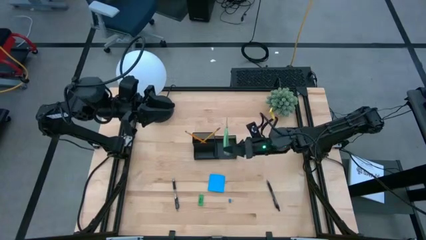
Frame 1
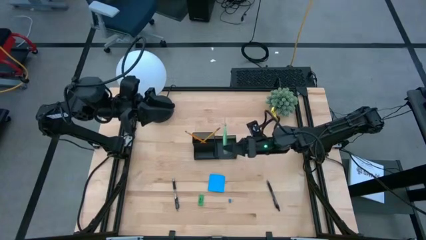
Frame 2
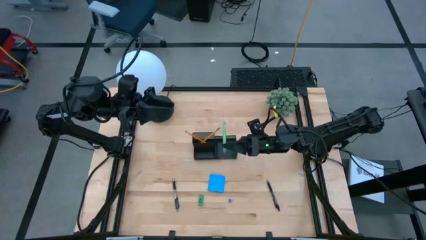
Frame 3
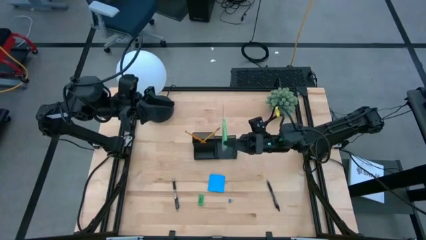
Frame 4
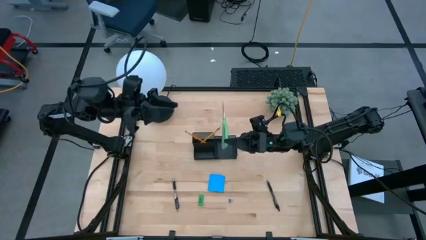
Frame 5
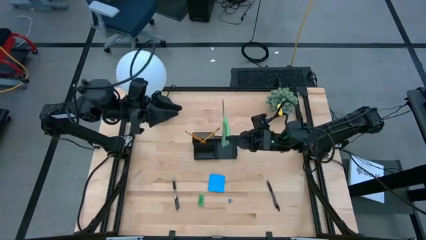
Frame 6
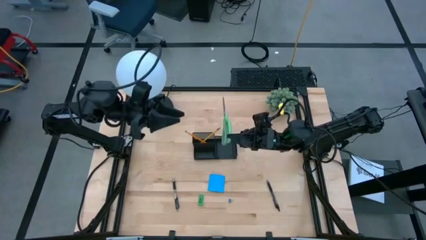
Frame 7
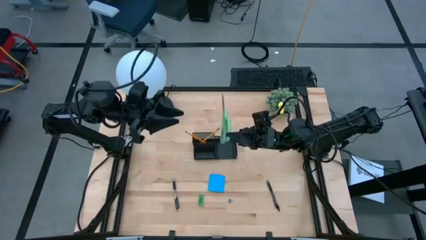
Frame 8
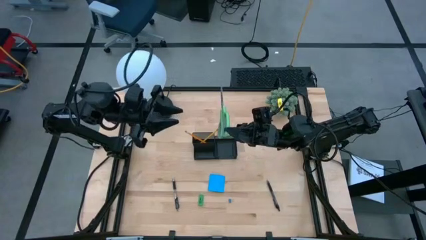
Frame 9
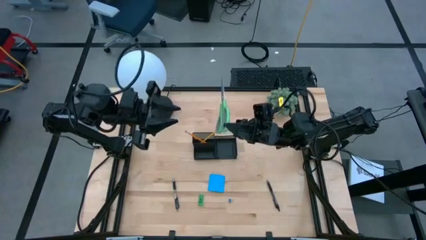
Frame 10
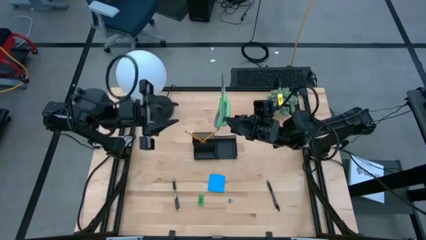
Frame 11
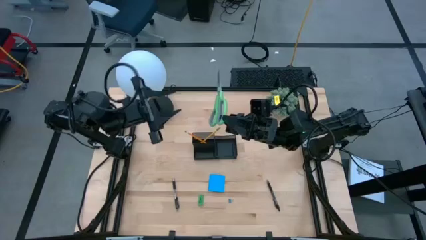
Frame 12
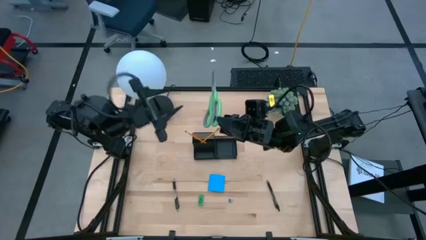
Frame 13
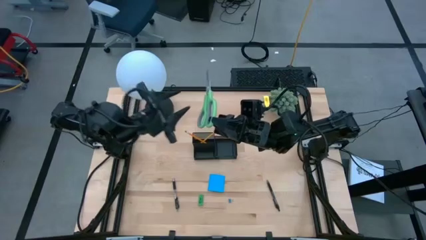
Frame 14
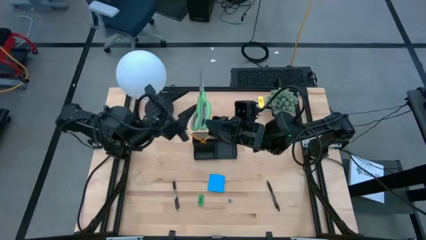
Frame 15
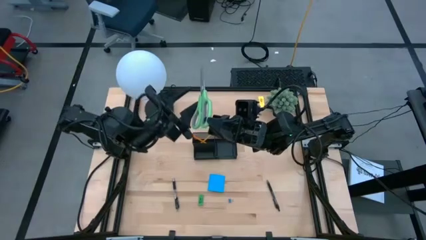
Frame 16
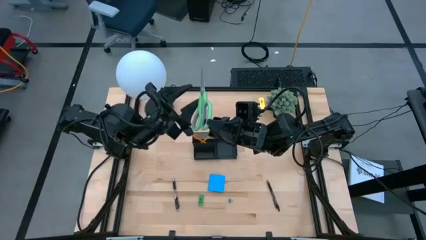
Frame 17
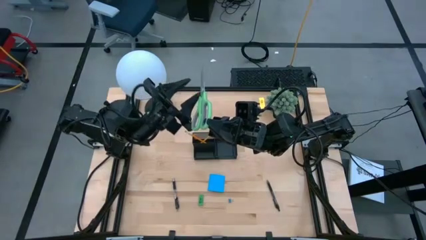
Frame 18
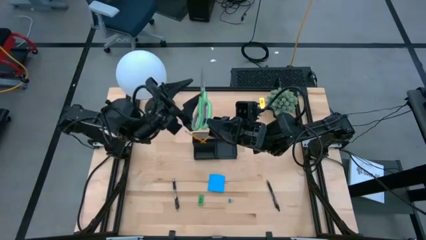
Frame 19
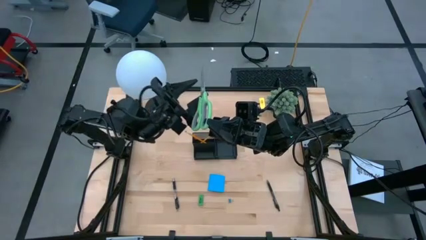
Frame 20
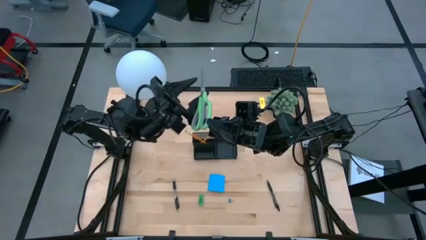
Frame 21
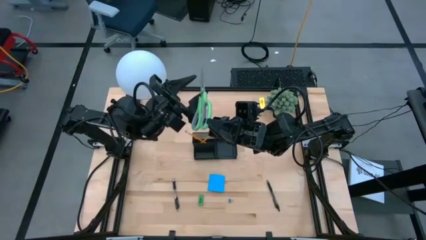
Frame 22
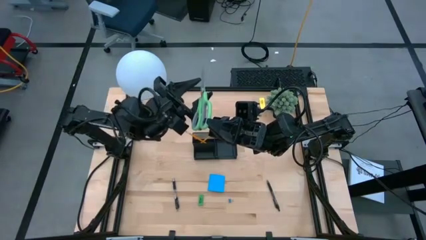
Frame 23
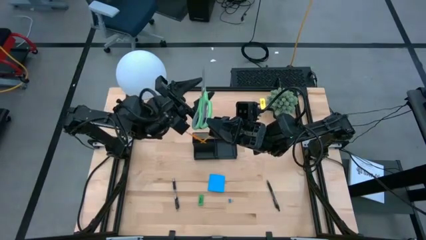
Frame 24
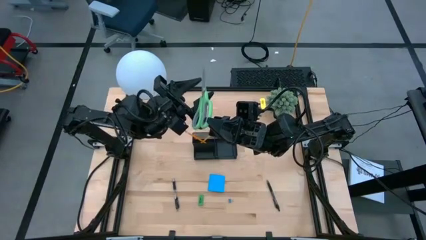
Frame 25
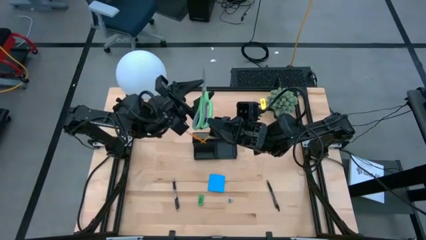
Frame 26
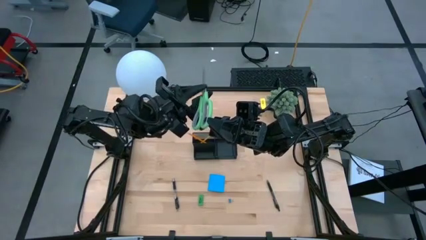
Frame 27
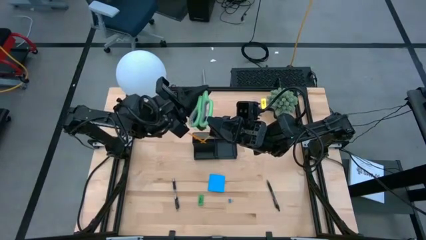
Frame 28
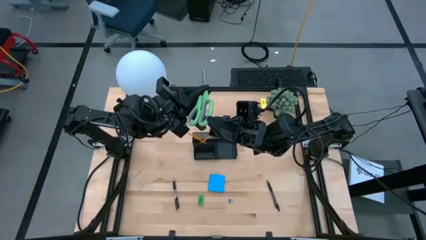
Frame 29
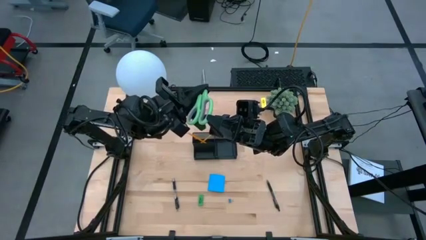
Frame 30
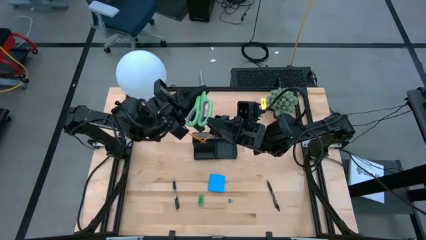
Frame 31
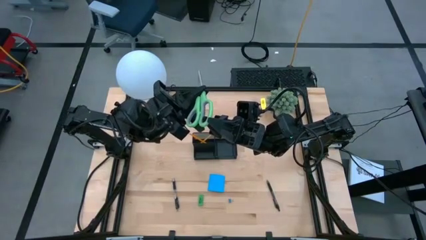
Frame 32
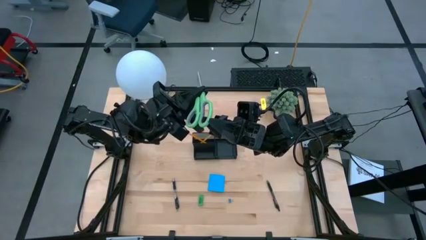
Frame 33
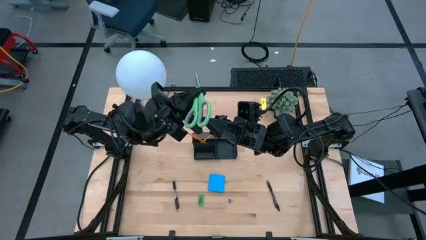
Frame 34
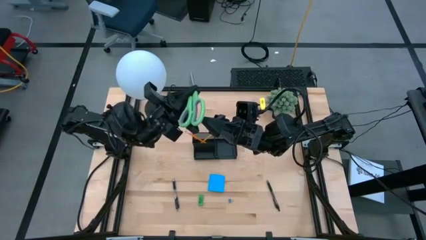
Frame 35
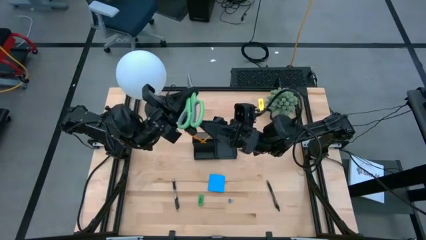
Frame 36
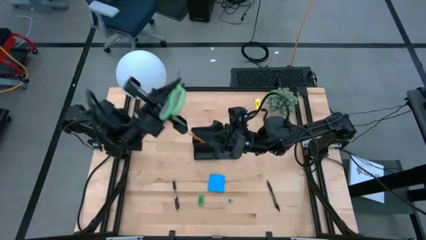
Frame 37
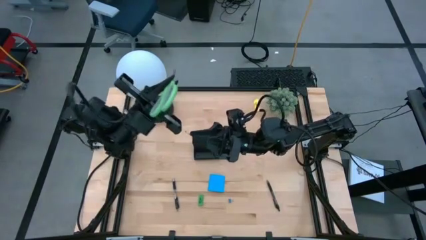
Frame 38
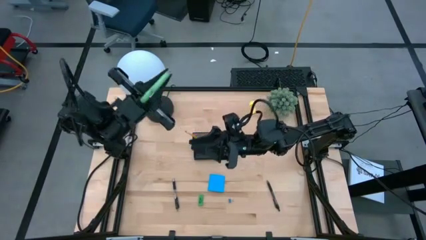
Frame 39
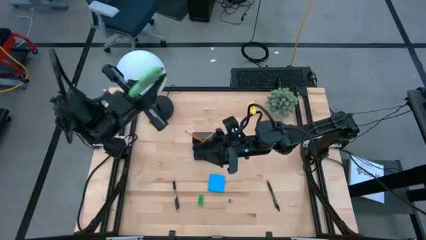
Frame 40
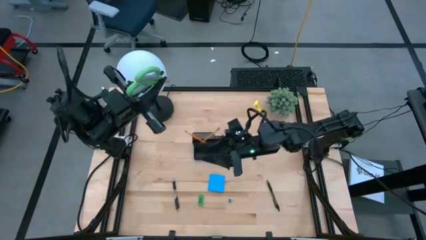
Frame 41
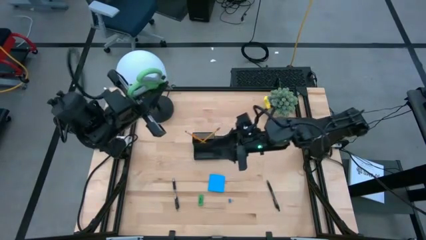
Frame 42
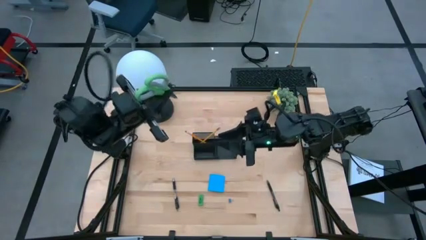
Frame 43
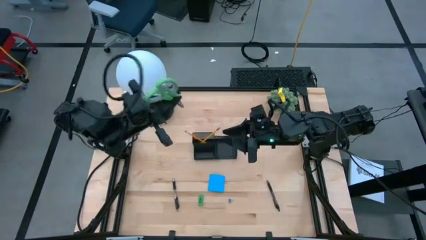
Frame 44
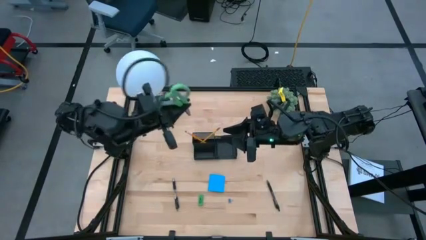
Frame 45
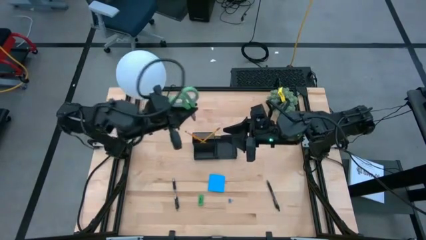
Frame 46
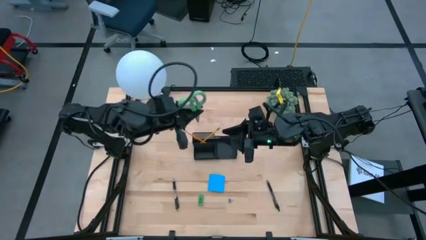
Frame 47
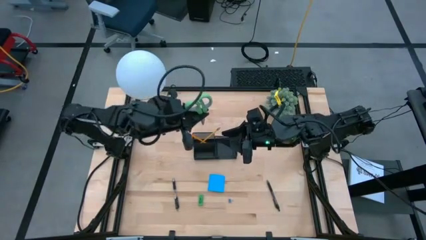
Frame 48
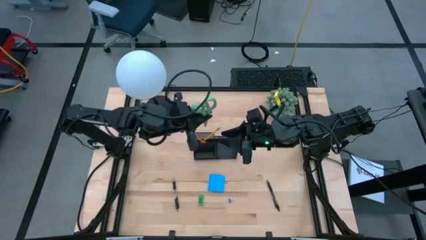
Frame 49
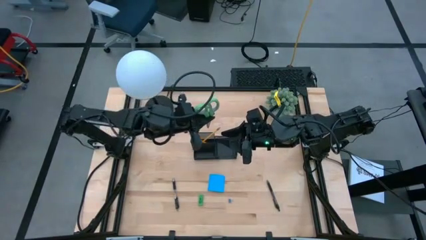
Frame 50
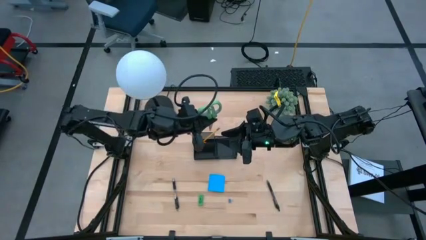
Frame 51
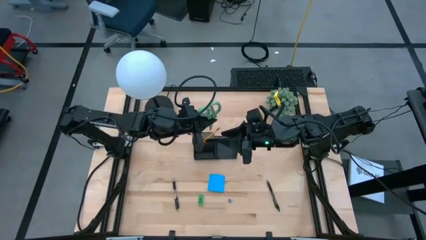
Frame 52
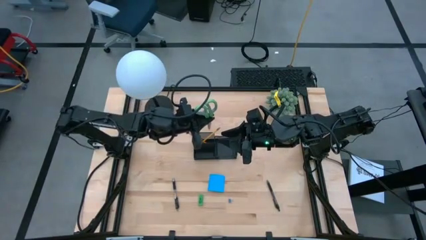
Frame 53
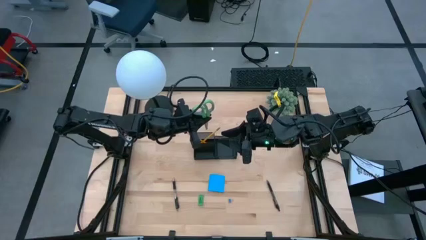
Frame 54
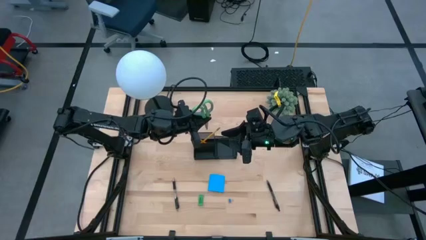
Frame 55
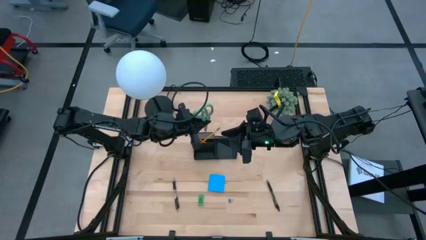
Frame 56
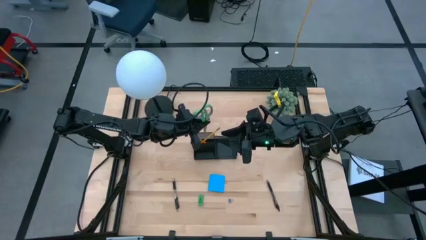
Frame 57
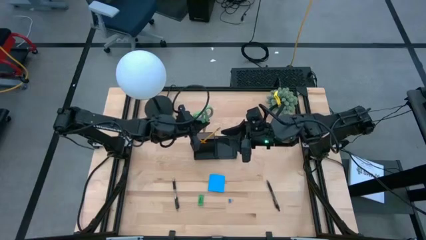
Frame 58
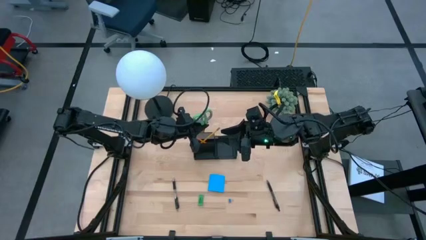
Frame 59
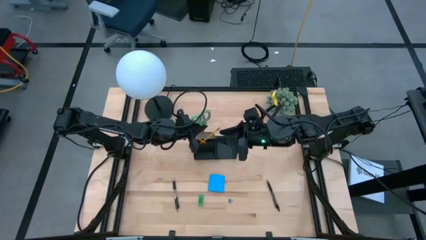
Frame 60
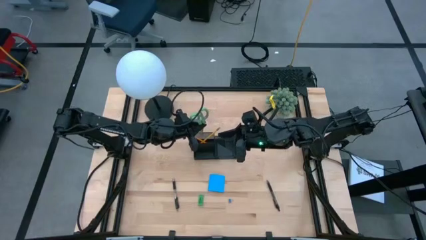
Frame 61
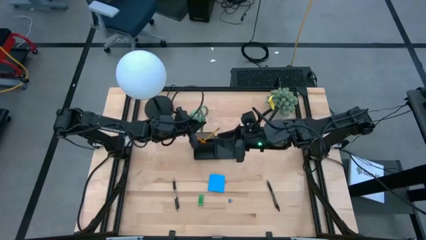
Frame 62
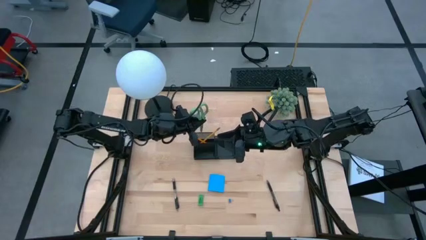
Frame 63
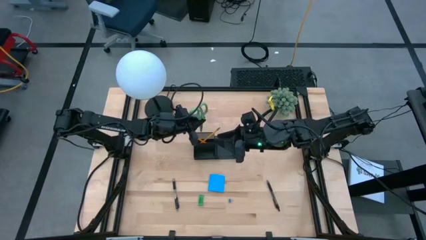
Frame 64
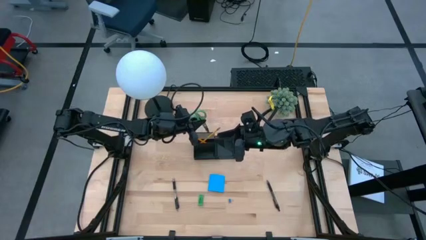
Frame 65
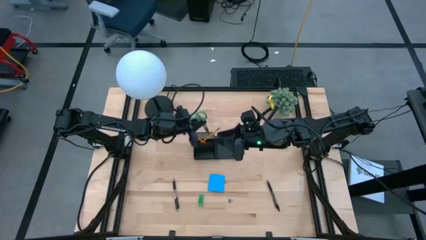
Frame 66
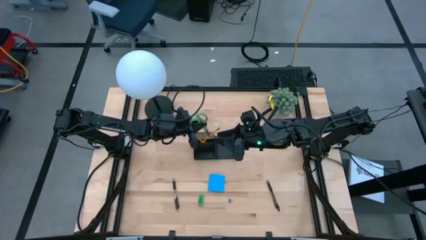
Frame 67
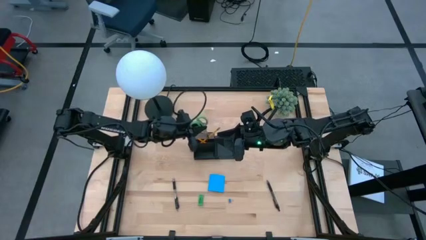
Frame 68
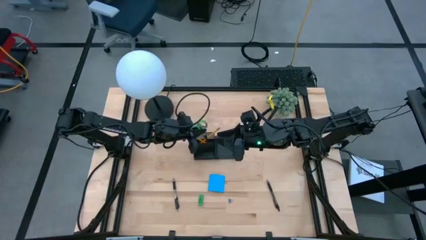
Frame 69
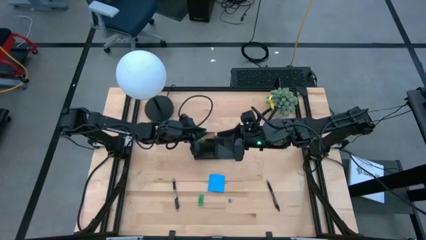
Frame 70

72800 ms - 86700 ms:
Task: Pick and place office supplies into organizer
Put the green scissor into the black desk organizer
